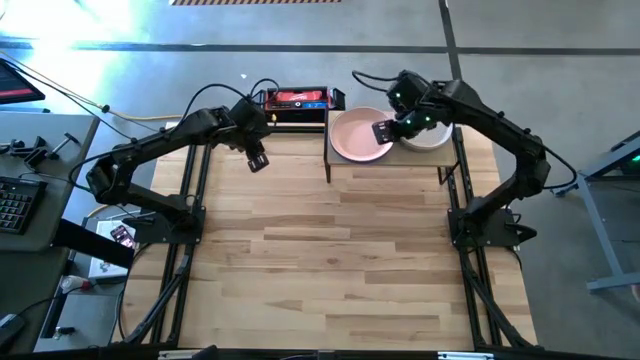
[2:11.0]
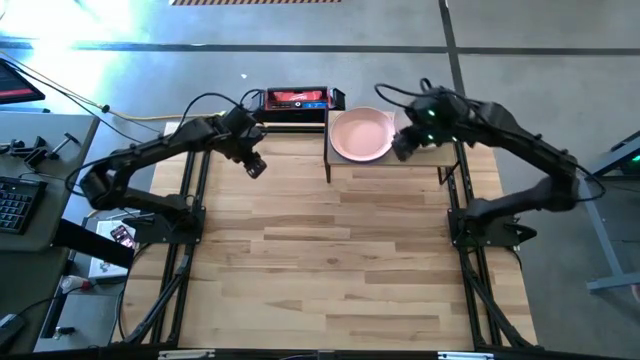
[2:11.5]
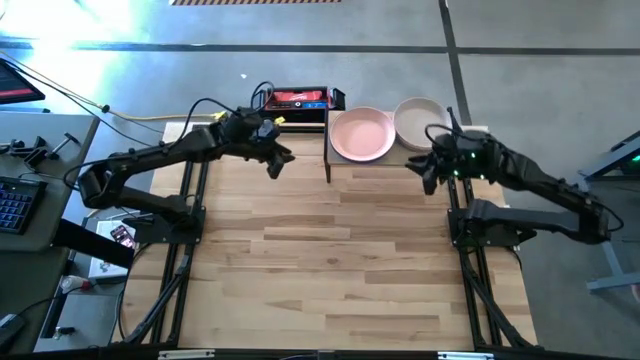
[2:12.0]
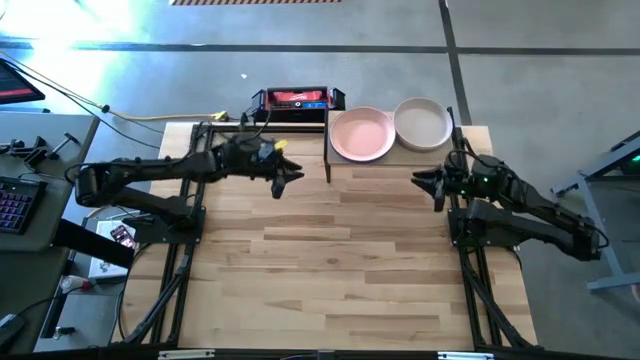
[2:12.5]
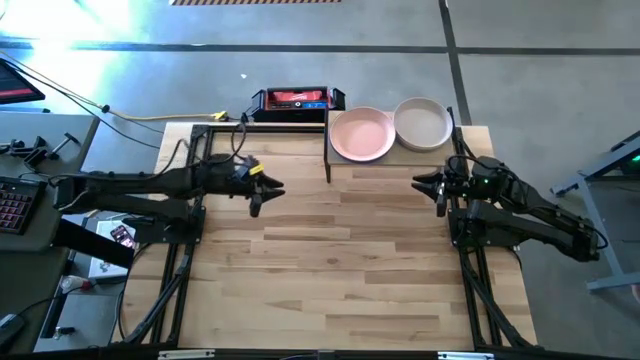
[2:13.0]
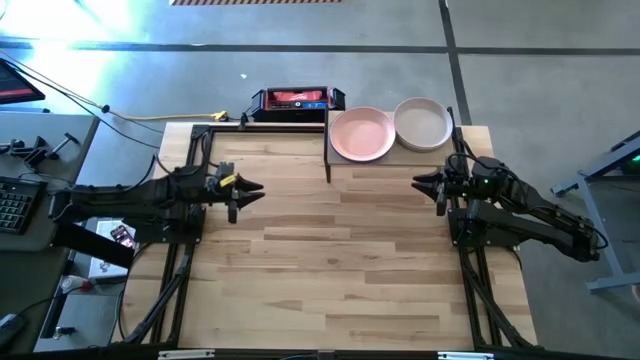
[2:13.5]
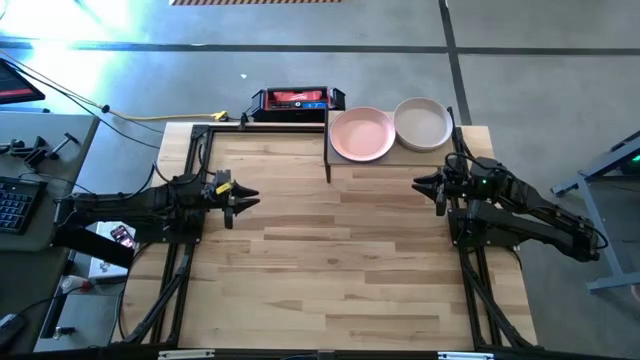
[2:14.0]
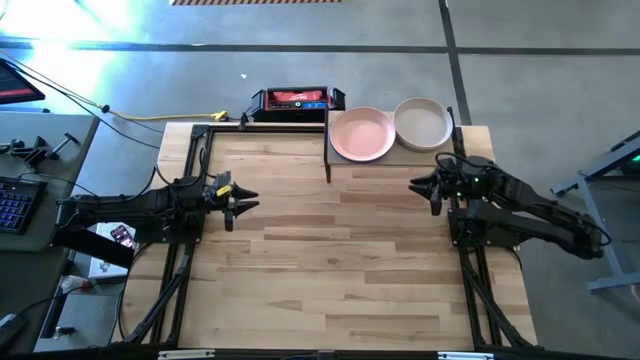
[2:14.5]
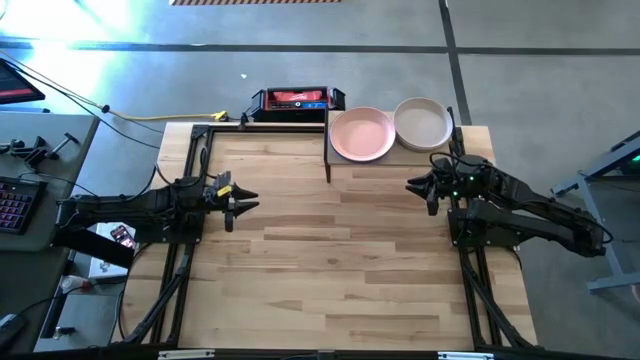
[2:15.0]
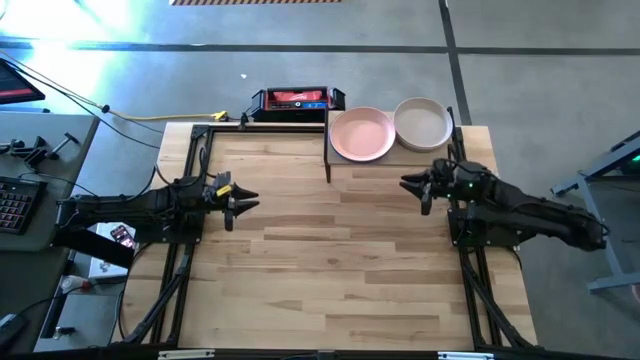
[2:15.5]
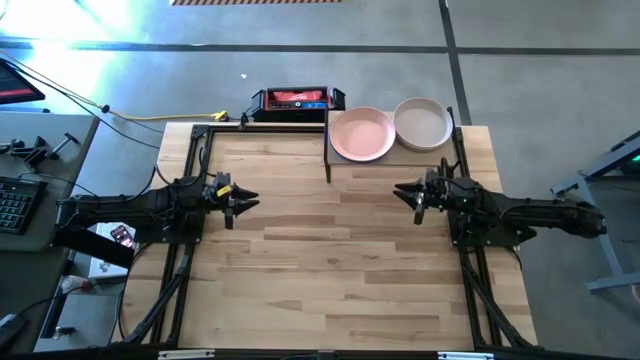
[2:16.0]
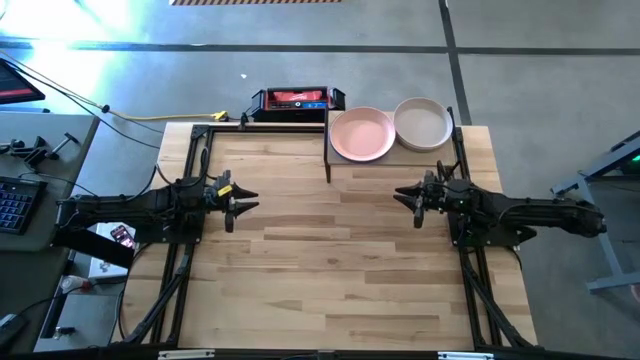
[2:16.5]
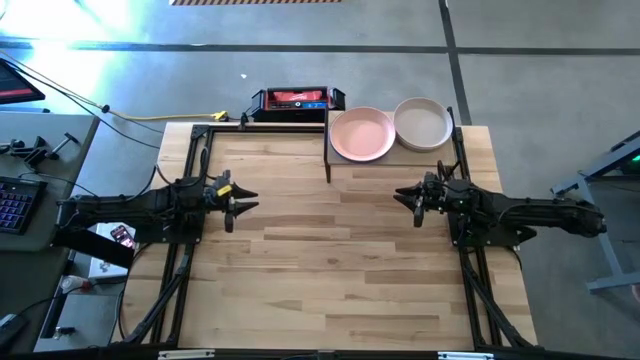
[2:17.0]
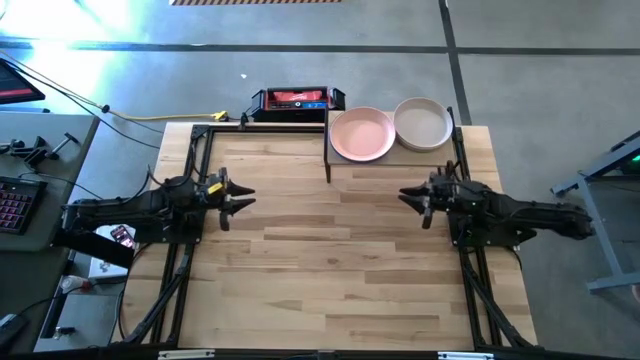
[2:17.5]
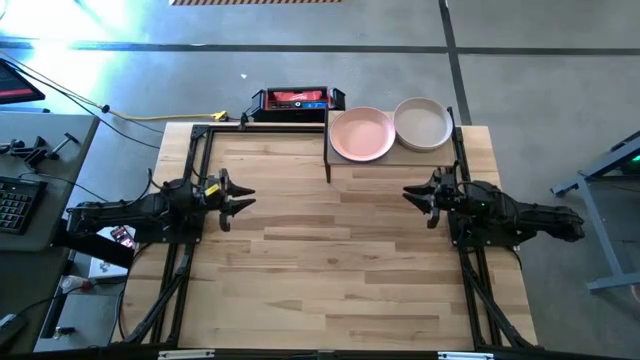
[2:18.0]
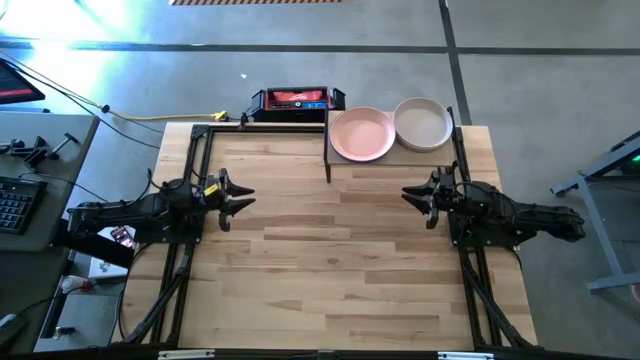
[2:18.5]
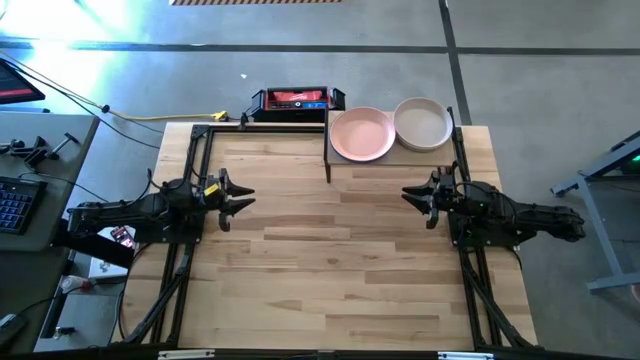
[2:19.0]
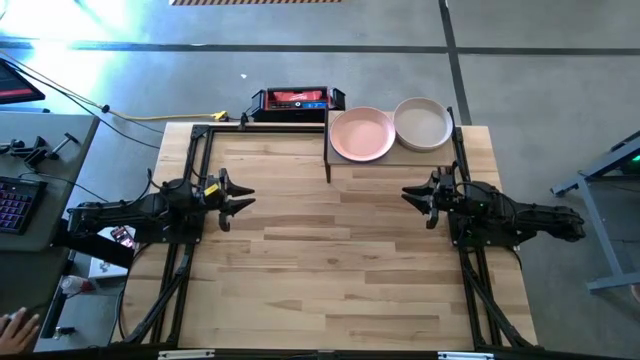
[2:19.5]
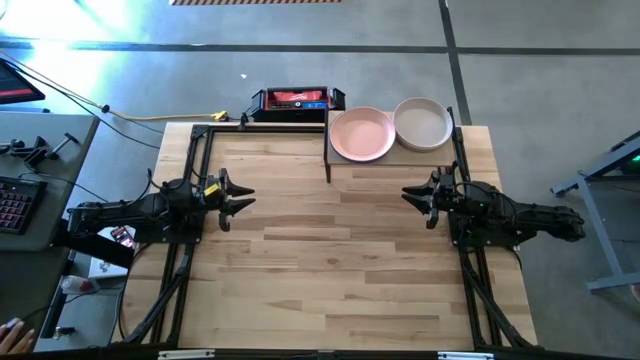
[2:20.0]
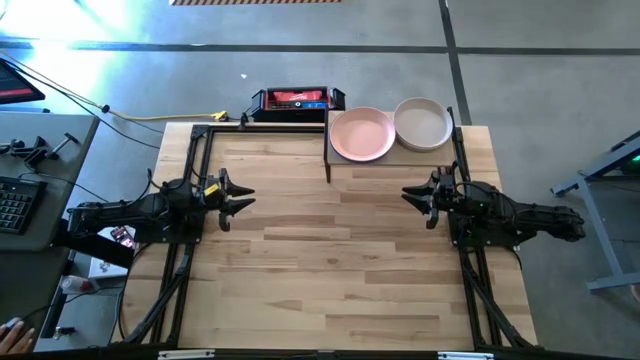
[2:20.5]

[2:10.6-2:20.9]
Task: Place and stack plates onto a shelf
Return to Home Position

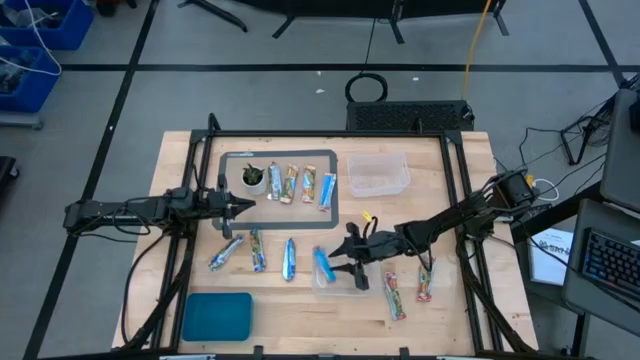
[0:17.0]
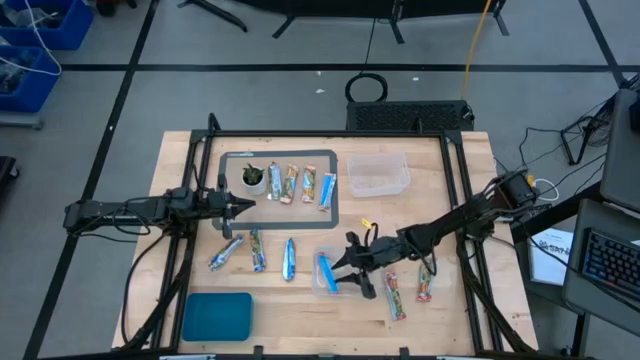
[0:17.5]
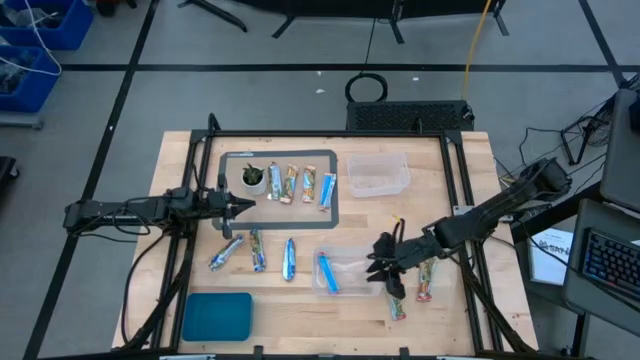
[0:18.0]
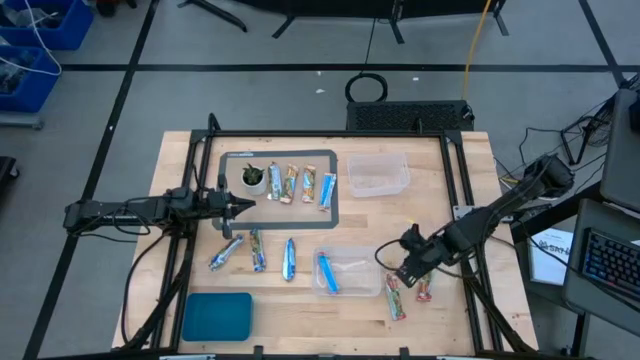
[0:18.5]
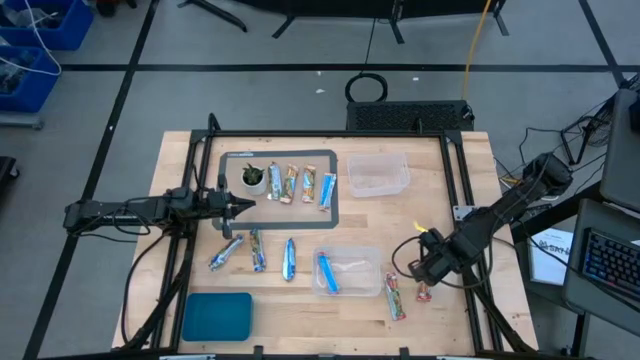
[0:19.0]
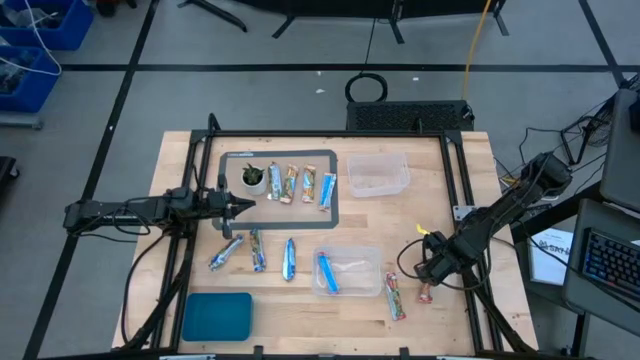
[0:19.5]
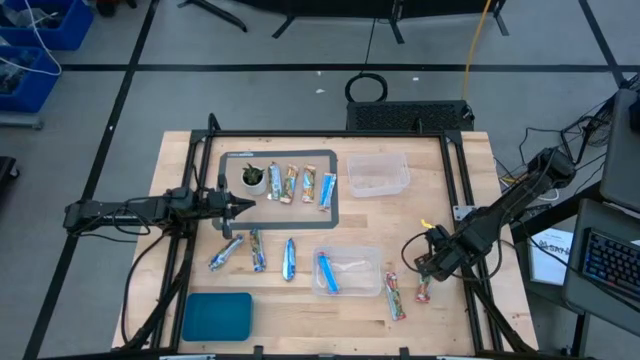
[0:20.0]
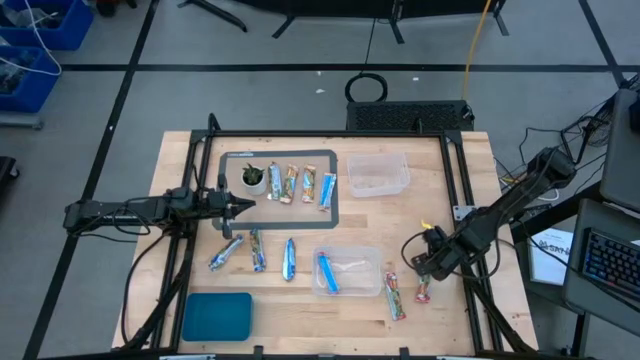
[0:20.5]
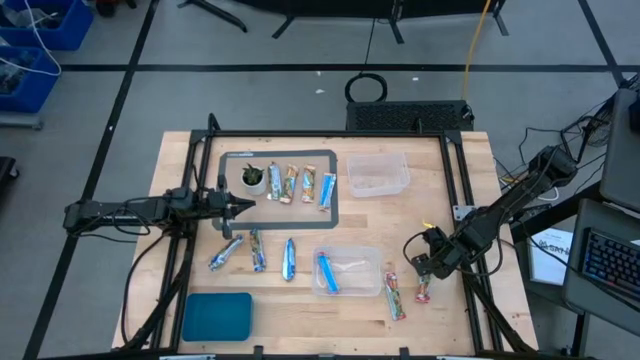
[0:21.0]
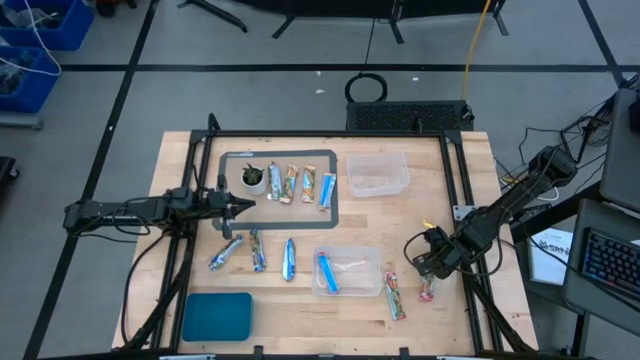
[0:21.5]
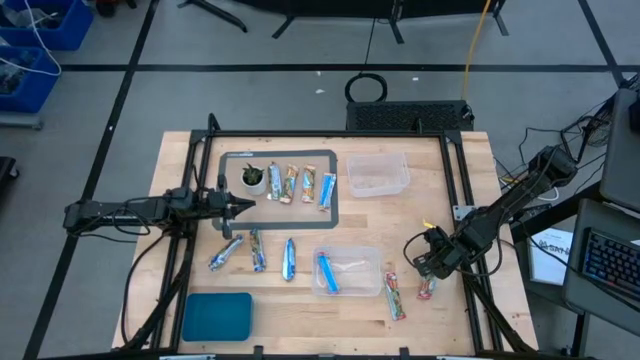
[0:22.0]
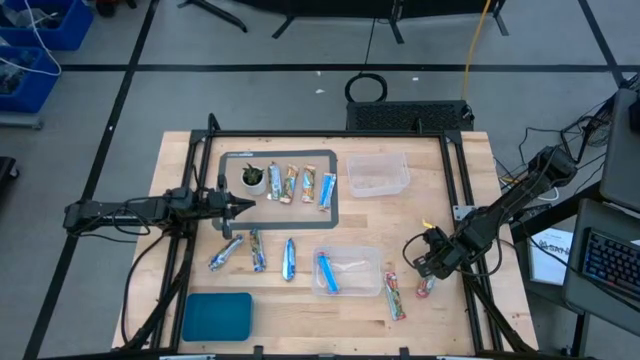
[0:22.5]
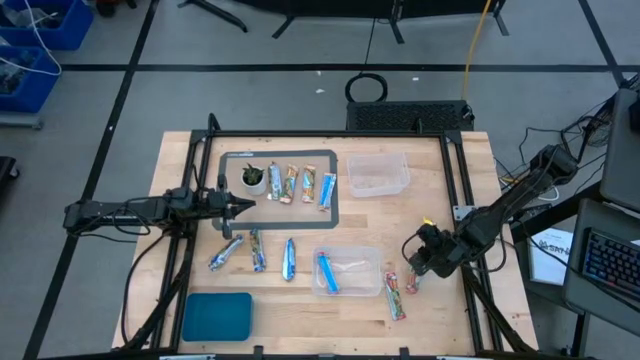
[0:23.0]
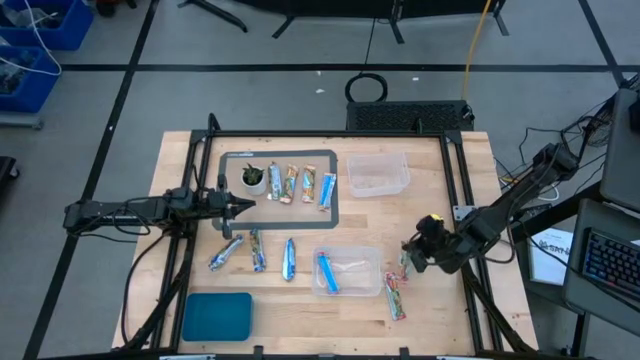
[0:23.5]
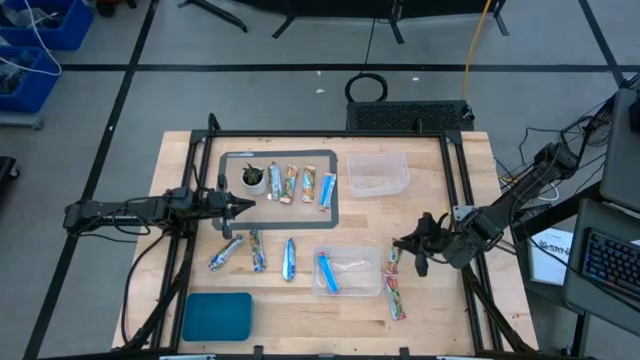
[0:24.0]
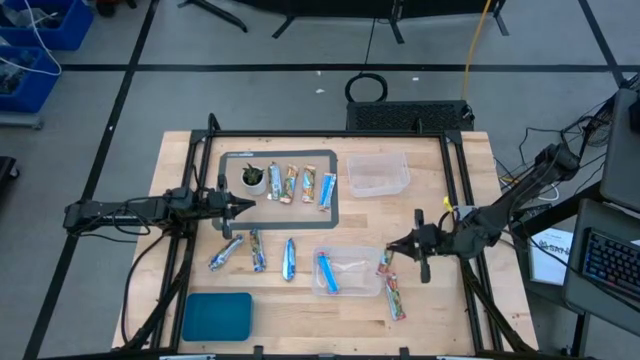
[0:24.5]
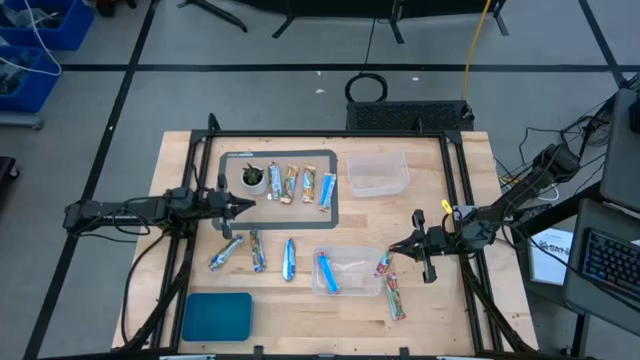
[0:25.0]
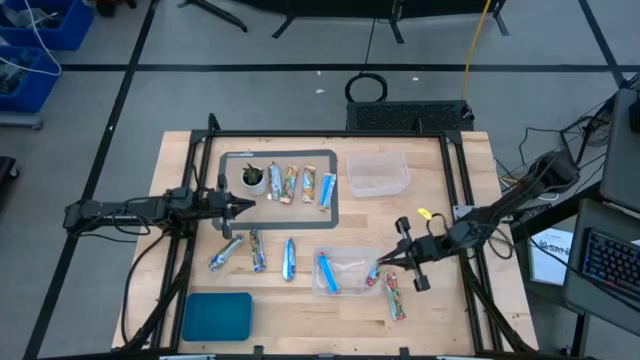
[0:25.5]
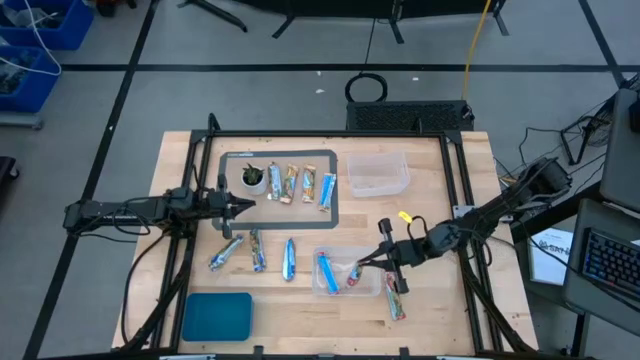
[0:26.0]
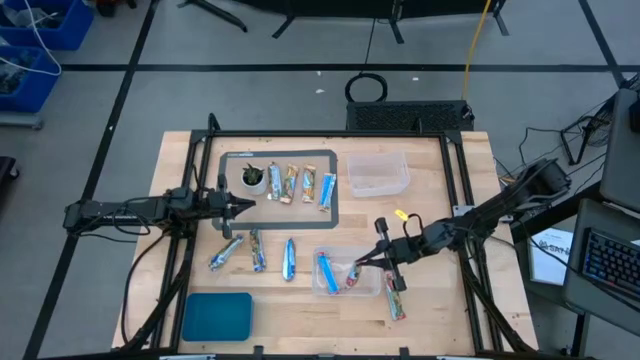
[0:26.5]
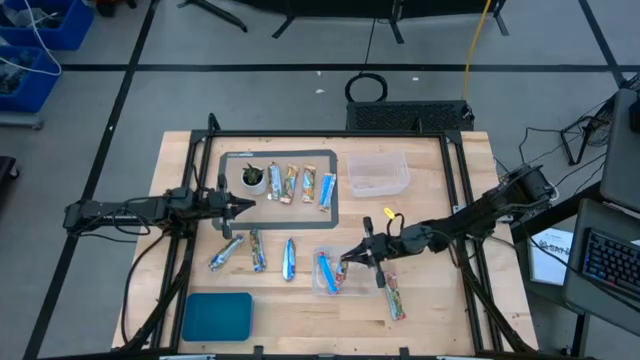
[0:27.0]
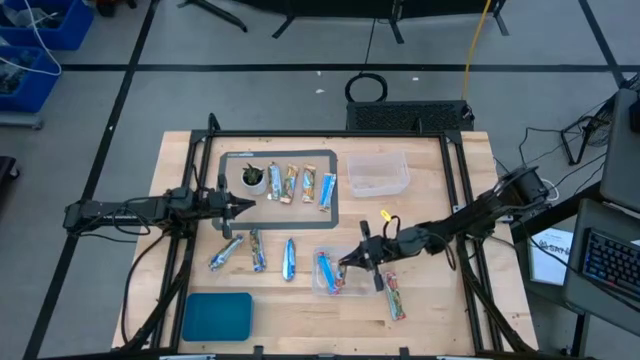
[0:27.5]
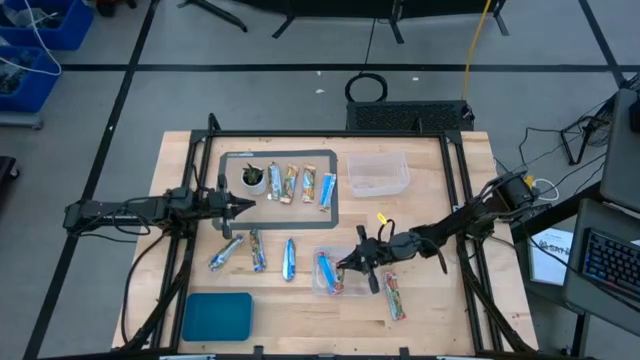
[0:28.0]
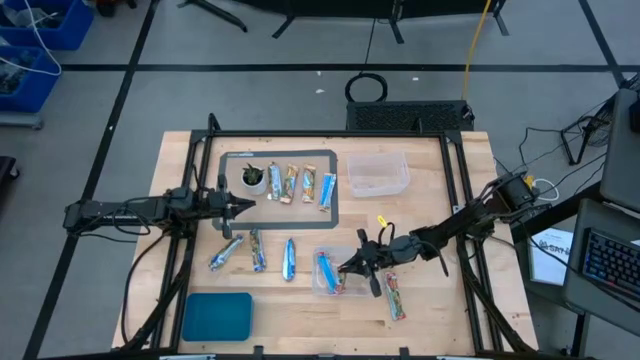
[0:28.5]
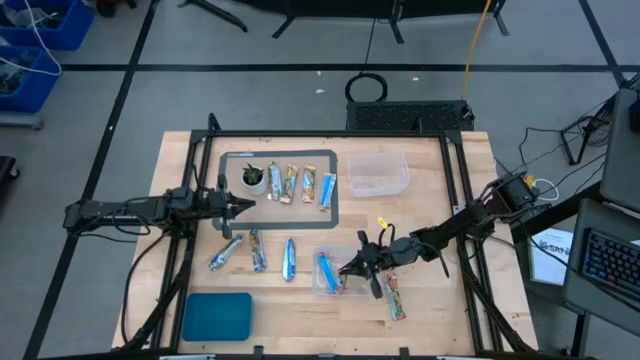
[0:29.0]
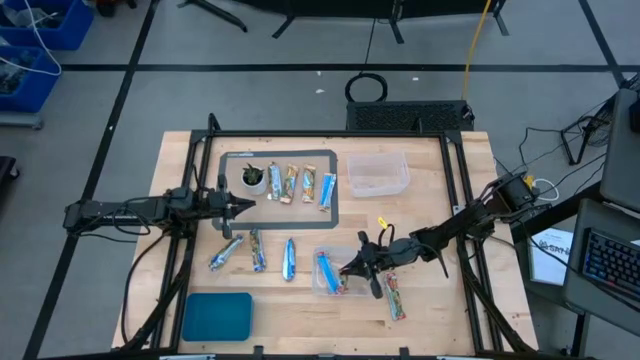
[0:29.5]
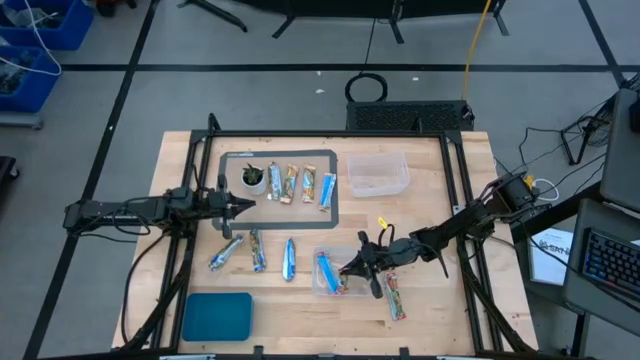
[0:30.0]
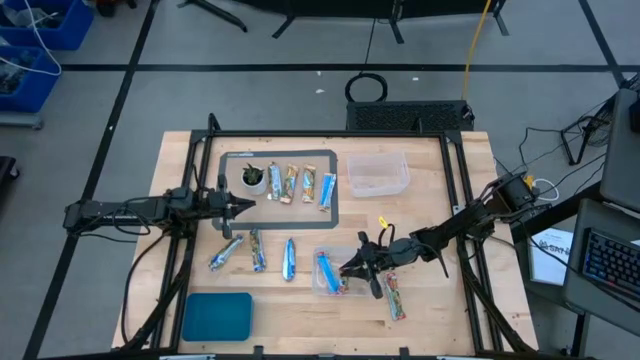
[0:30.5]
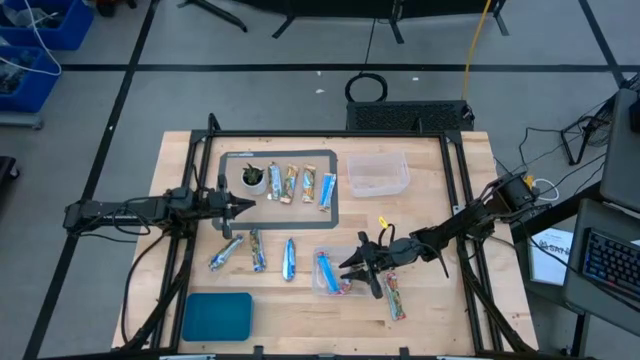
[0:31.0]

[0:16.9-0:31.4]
Task: Pick and place Granola Bars by type
Put the right red granola bar into the bottom transparent bin
